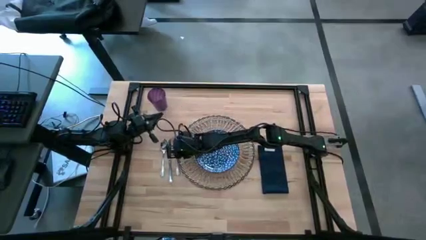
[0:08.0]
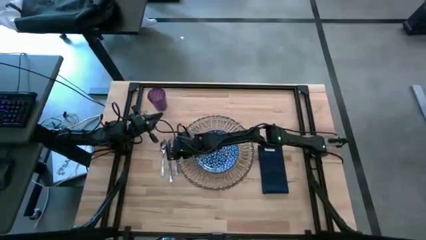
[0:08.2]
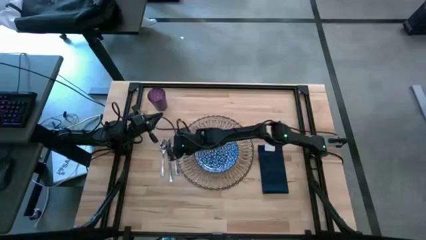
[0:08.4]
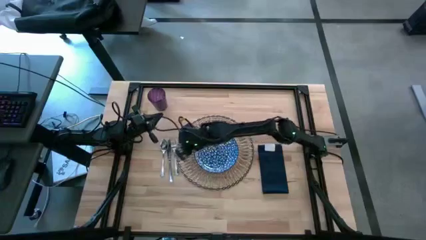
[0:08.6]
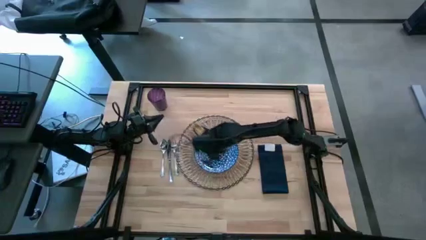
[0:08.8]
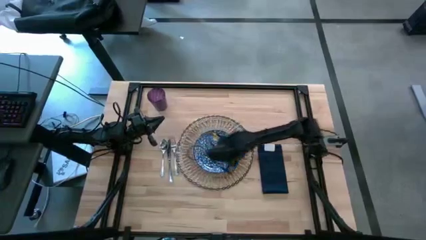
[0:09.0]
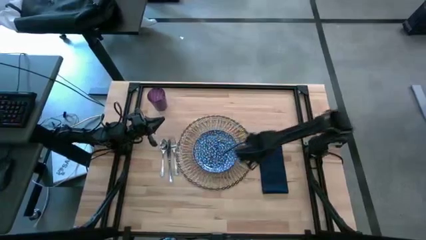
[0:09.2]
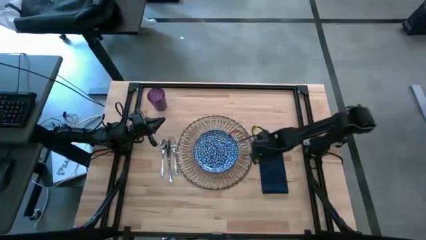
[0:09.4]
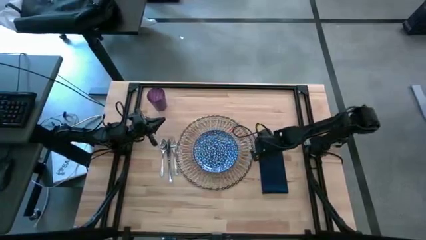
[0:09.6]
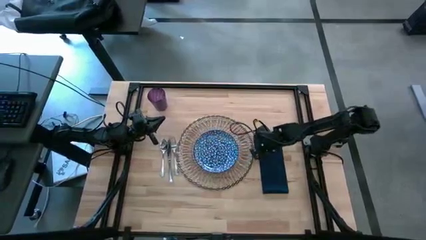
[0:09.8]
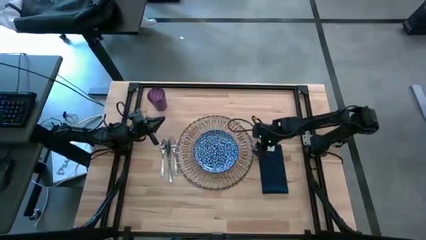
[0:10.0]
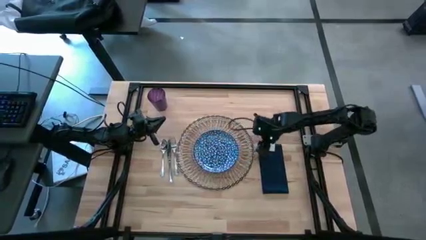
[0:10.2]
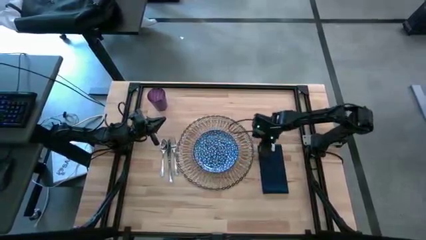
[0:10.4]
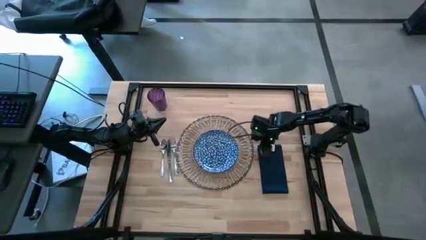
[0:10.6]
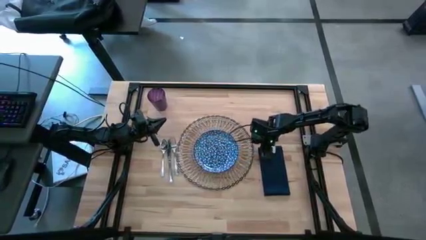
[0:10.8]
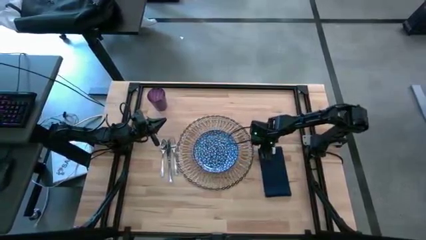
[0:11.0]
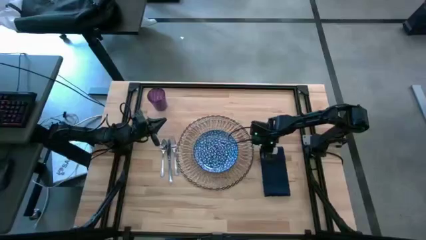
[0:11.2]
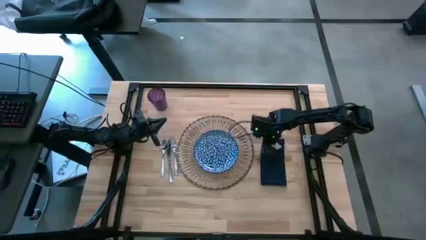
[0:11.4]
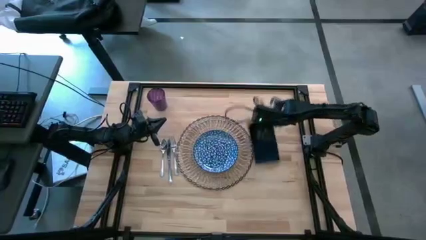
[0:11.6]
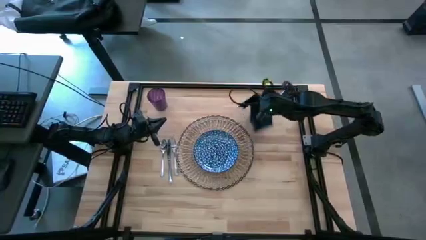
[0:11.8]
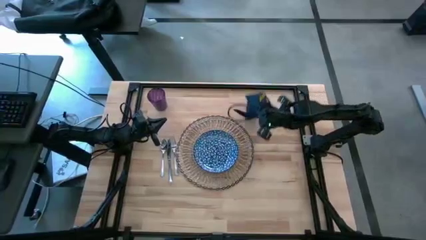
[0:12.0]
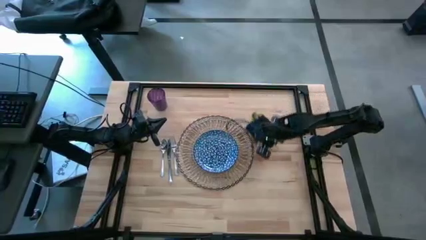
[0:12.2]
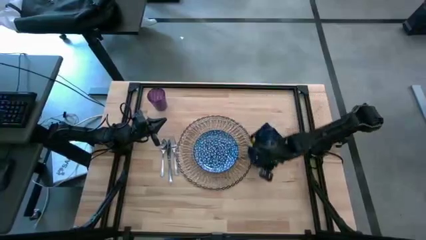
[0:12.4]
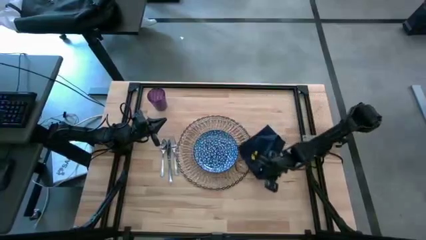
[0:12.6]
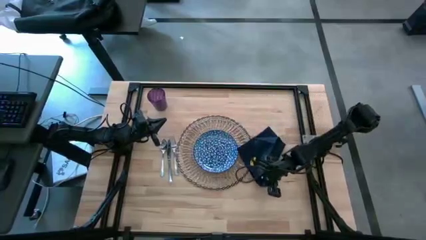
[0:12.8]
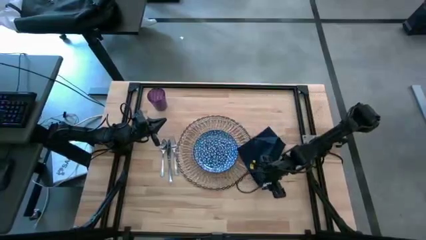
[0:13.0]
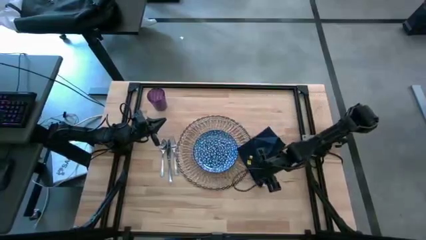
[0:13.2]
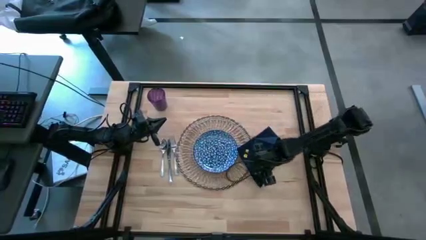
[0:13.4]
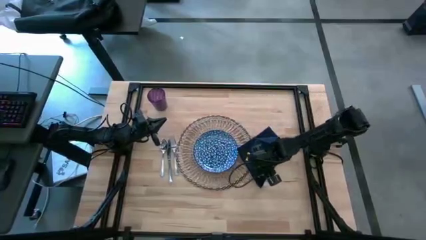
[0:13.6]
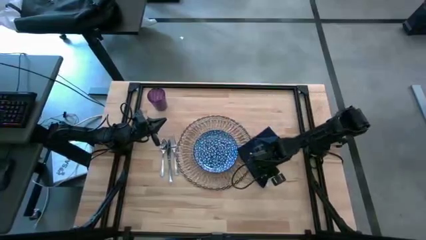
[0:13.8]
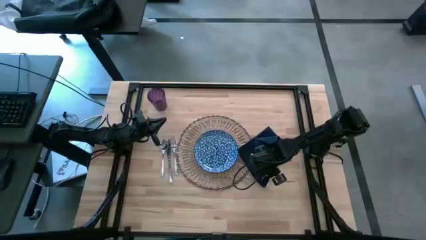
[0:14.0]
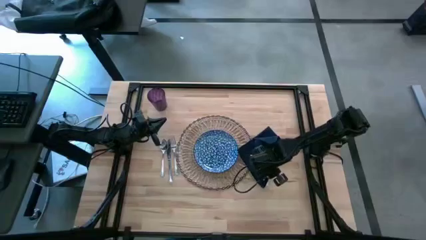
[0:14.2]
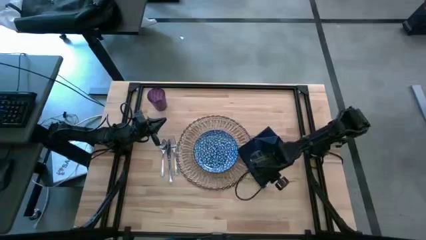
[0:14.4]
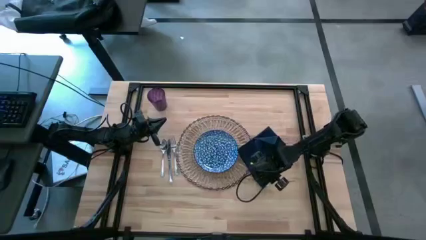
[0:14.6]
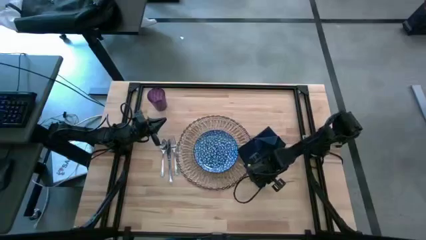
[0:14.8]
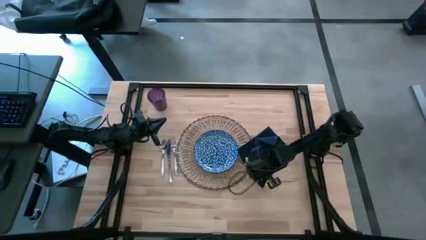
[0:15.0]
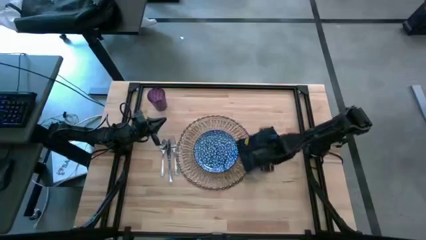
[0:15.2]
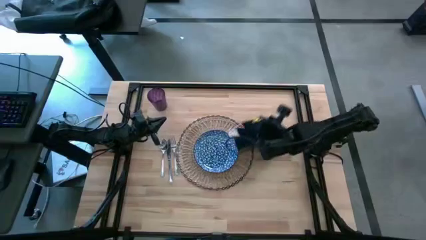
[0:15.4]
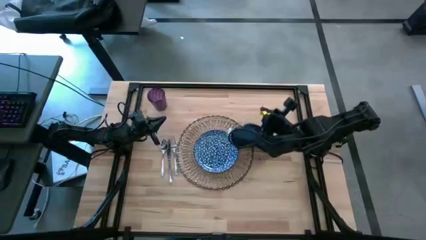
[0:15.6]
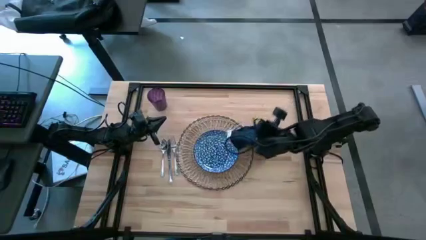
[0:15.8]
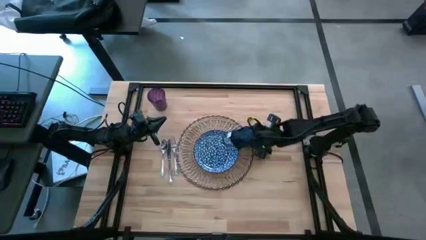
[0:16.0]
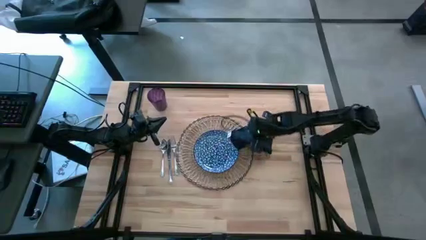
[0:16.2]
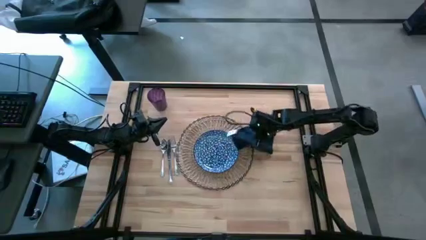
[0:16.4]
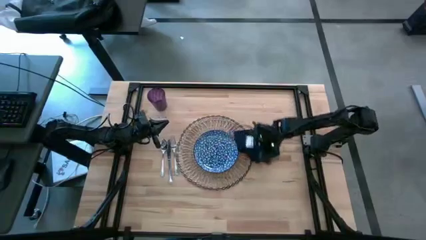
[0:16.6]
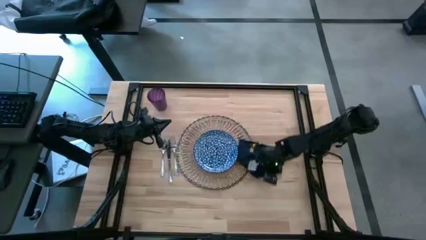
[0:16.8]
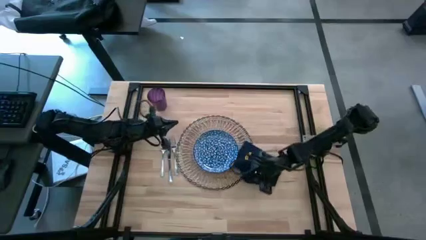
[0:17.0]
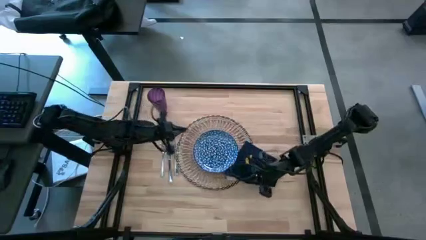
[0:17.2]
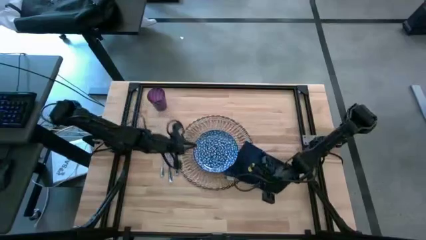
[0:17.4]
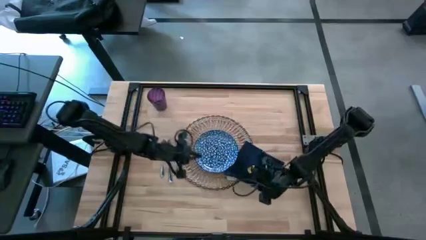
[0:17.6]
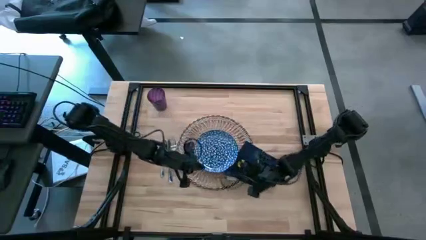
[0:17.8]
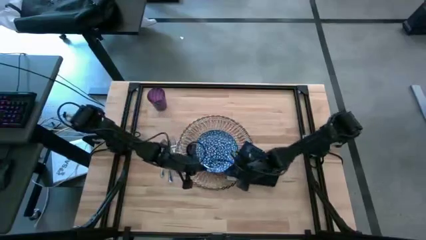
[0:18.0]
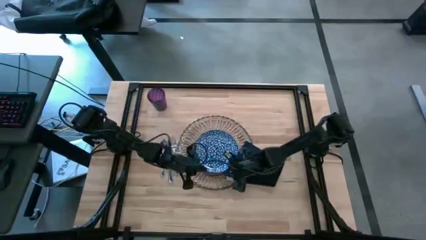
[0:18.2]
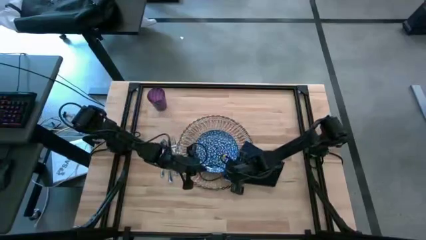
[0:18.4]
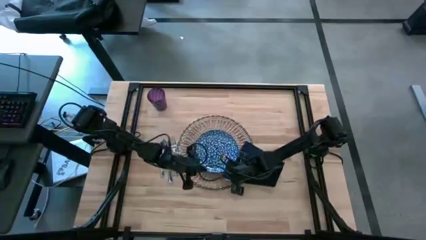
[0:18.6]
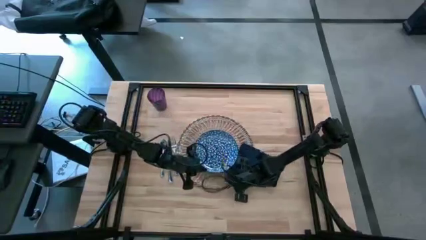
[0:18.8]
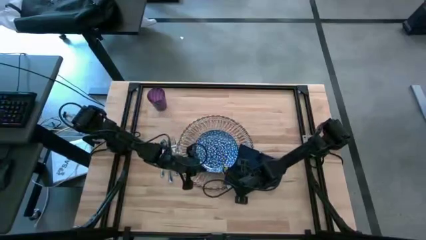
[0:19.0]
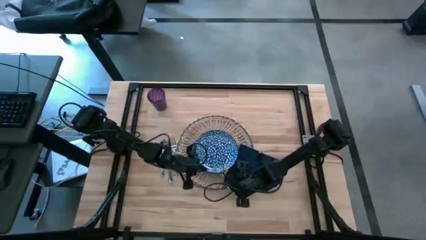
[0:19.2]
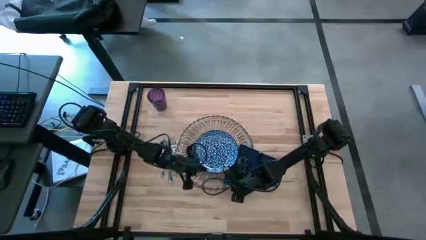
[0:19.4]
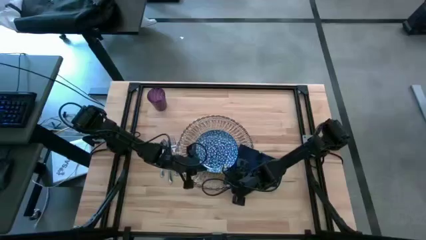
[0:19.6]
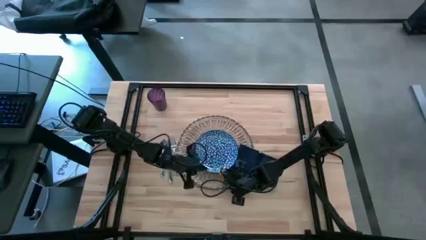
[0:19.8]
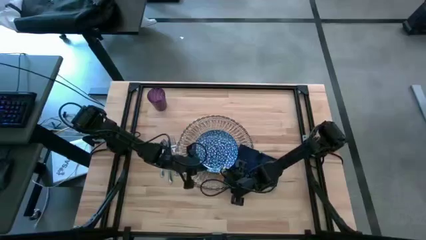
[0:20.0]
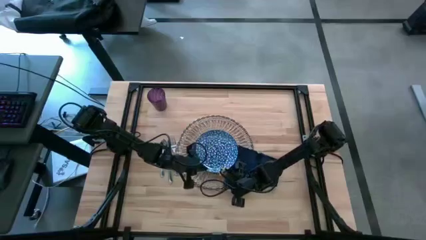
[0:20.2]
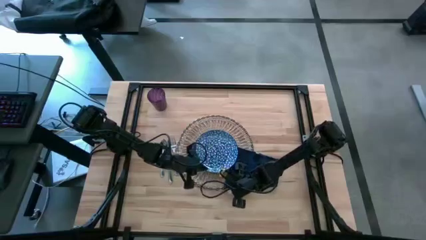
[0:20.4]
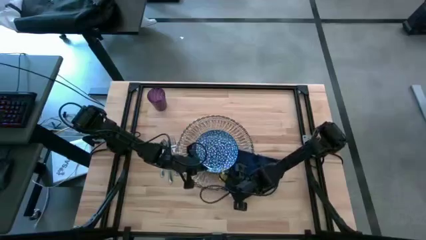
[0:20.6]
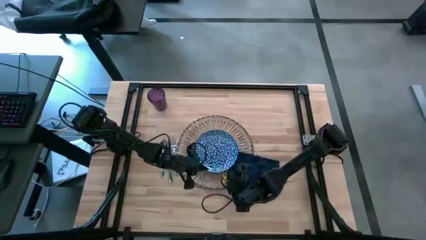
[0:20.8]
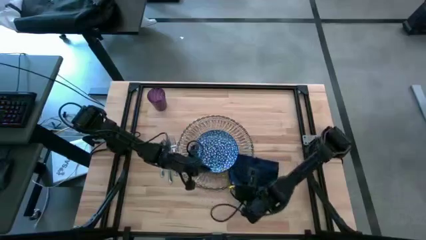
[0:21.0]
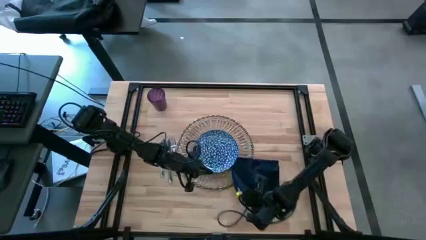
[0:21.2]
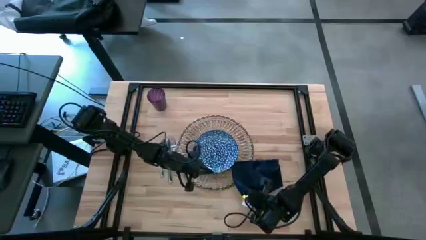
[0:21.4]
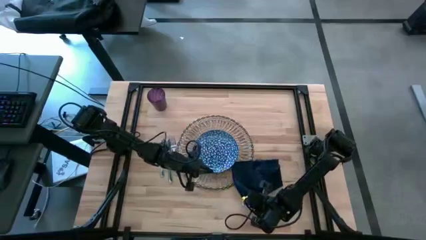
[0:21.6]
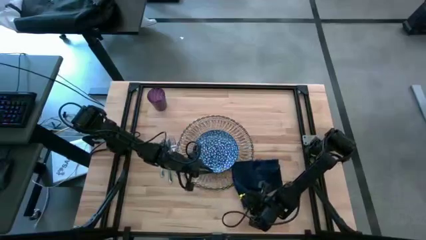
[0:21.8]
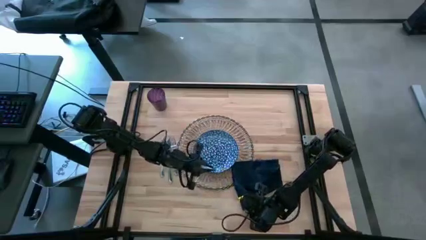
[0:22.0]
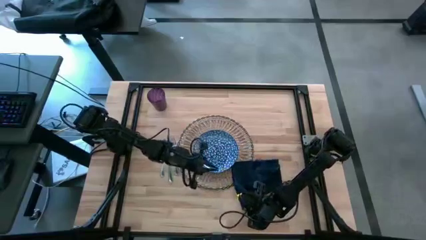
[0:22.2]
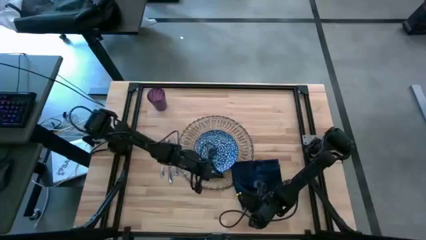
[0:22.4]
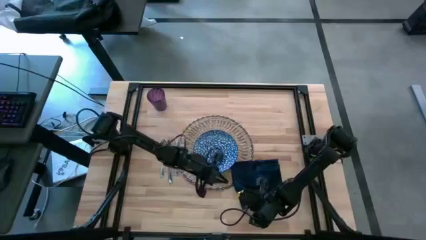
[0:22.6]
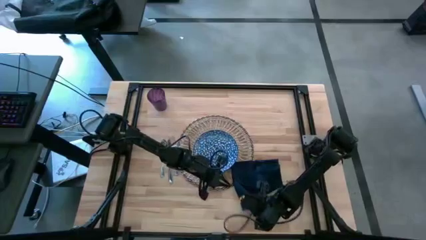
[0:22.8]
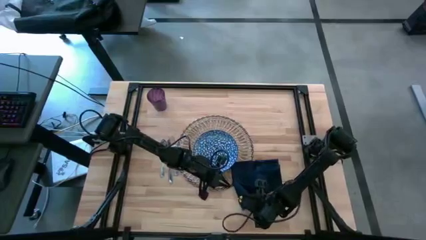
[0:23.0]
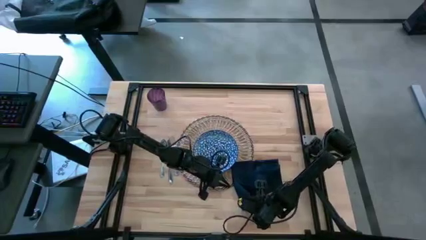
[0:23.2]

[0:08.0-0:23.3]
Task: Set table place
Fold the blue napkin
